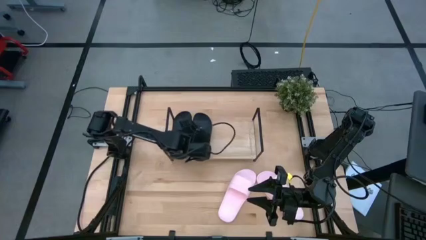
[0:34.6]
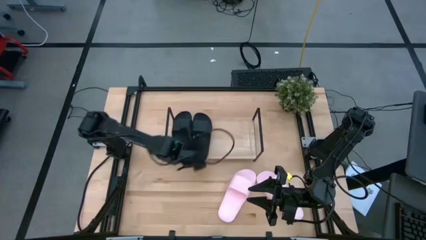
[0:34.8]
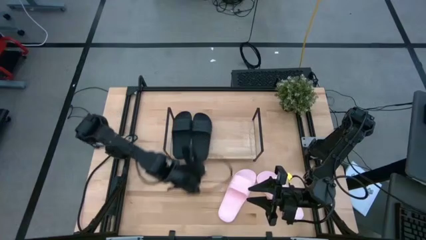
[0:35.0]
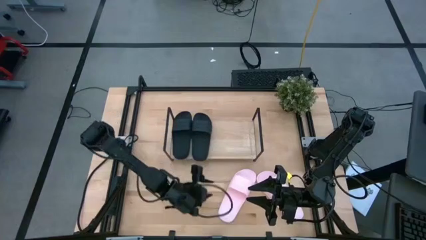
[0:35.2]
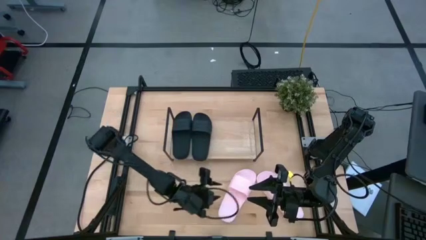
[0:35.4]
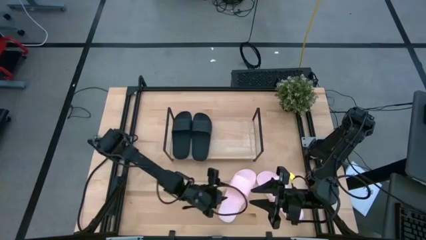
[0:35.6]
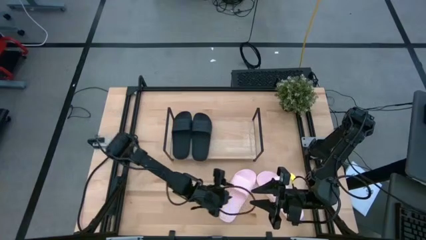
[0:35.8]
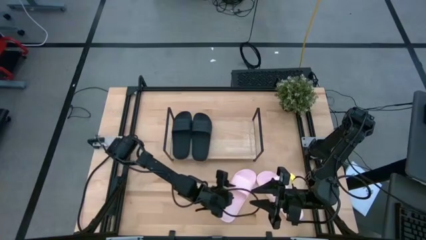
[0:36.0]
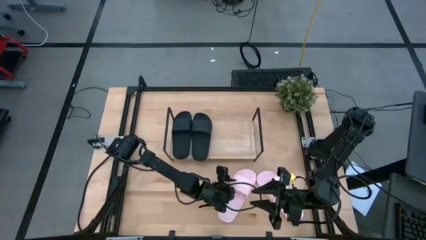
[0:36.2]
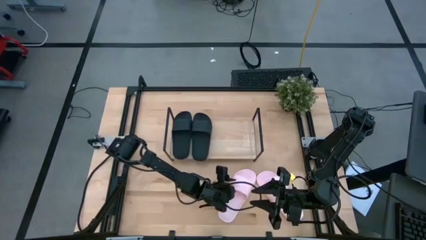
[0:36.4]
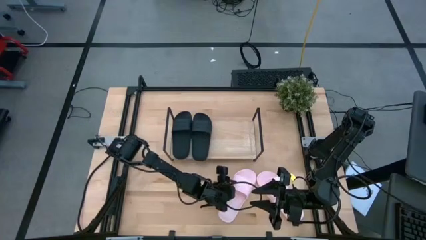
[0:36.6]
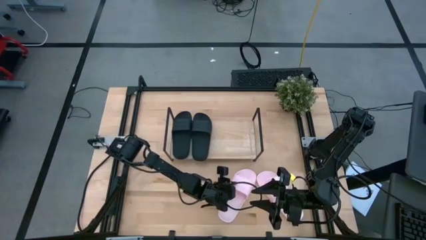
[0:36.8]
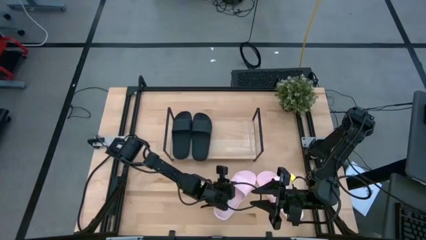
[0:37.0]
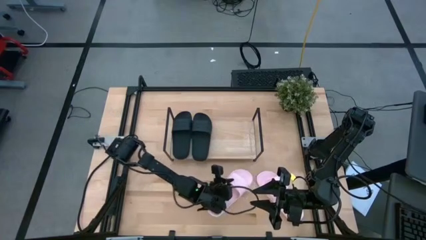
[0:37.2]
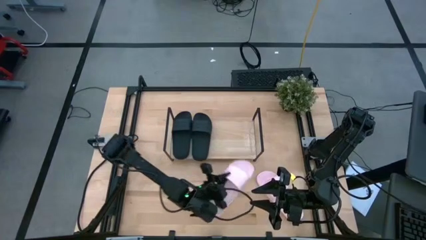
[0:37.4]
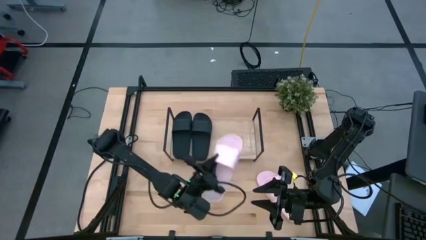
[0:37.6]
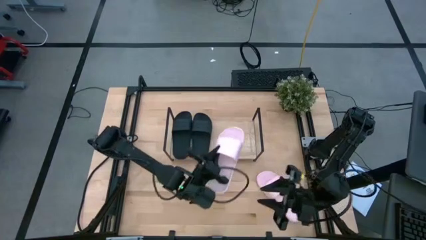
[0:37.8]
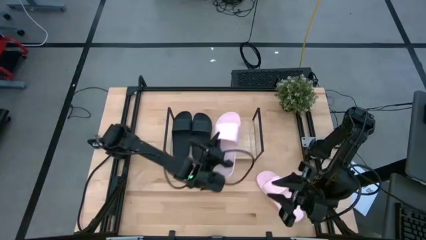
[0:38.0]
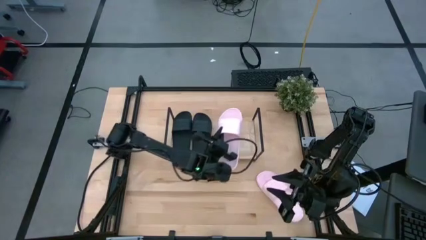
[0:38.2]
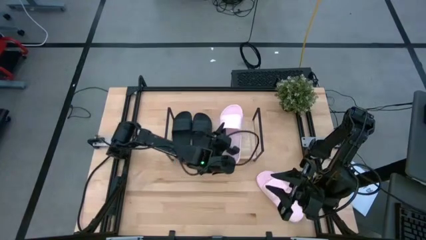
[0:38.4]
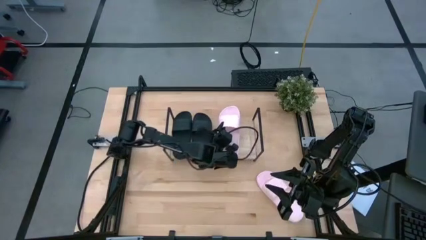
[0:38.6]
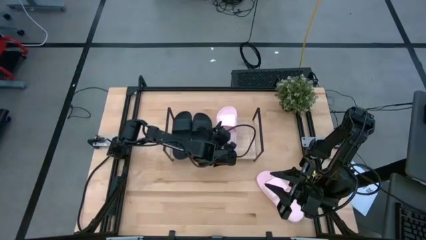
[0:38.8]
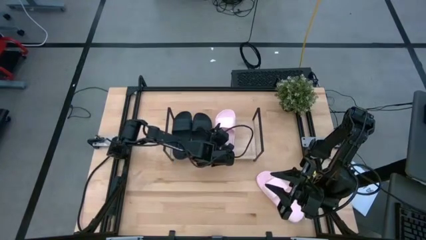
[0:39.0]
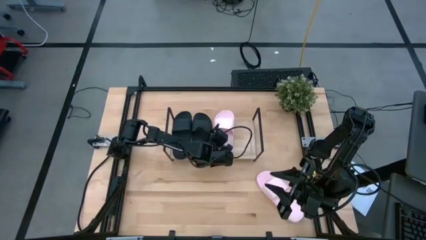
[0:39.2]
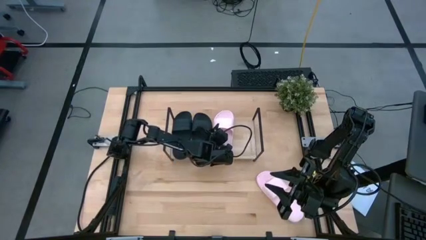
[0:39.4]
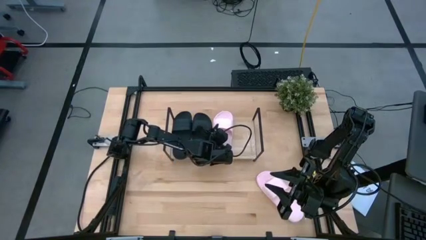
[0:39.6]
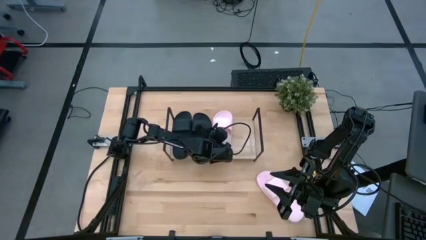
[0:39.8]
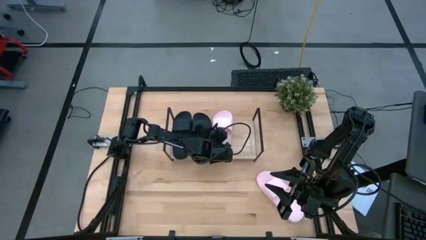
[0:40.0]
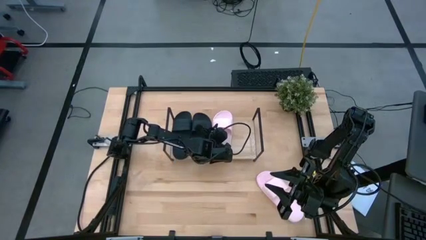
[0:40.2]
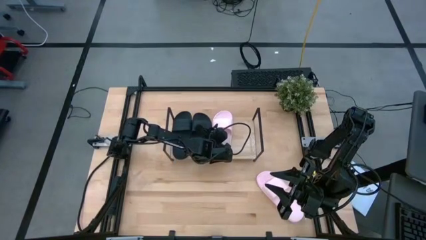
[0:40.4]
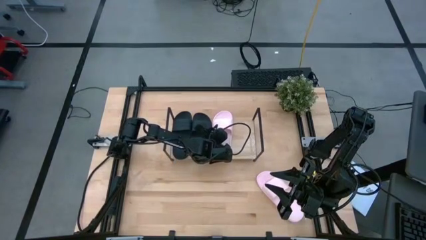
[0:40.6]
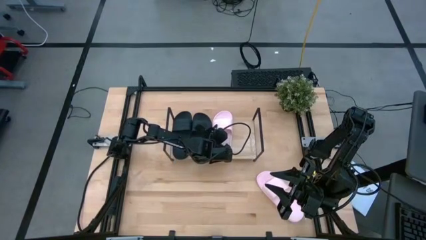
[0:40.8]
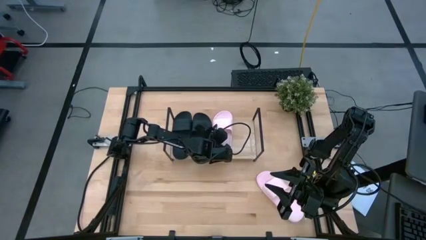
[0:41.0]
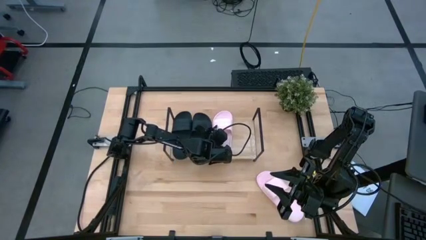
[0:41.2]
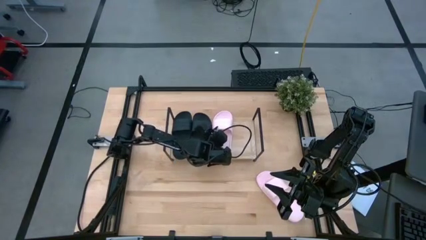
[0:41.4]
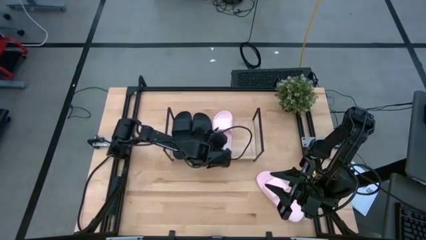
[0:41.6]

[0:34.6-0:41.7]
Task: Pick and place slides into the shelf
Put the left pink slipper on the shelf

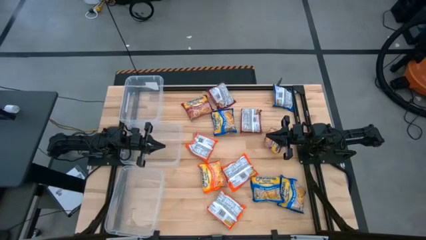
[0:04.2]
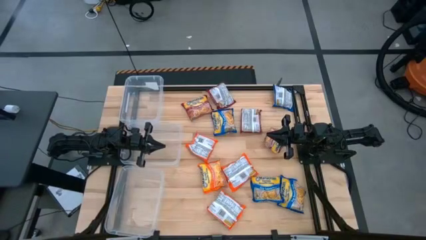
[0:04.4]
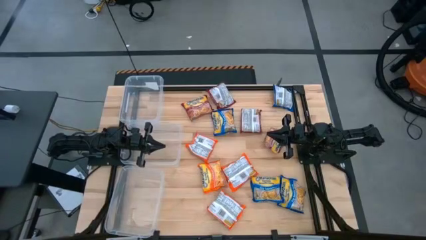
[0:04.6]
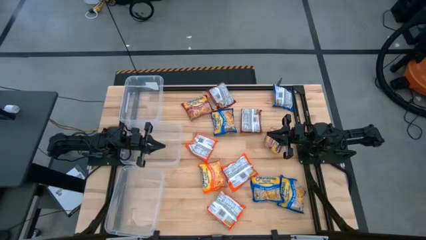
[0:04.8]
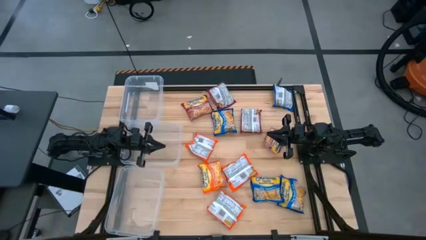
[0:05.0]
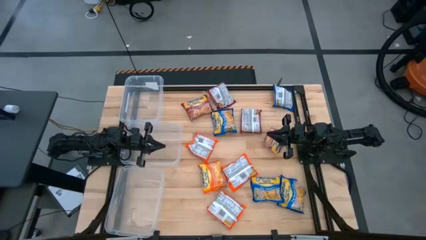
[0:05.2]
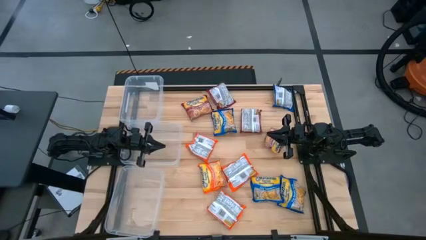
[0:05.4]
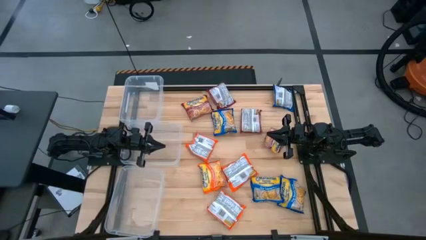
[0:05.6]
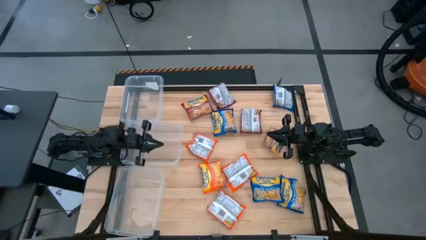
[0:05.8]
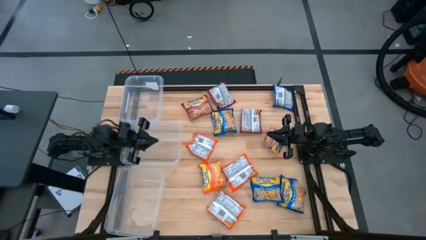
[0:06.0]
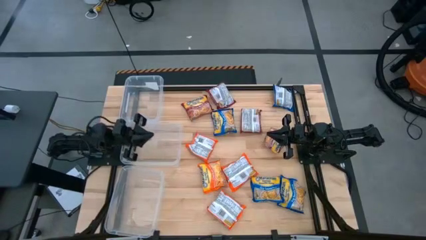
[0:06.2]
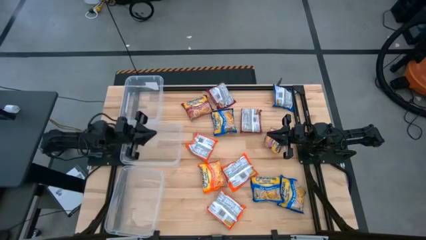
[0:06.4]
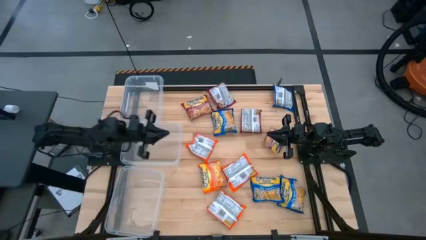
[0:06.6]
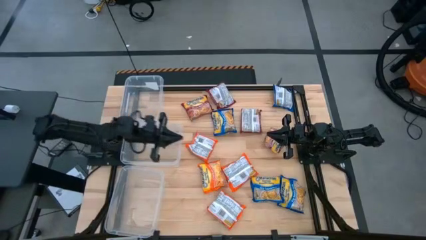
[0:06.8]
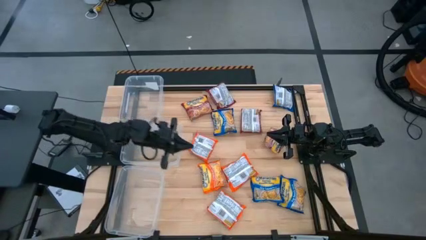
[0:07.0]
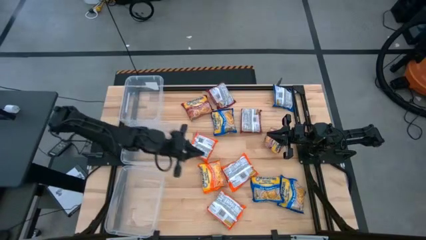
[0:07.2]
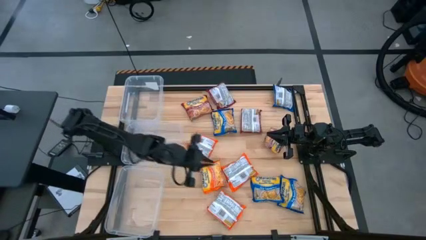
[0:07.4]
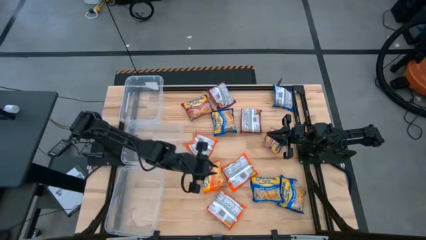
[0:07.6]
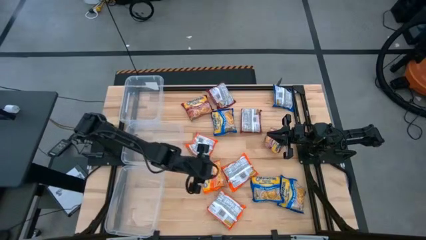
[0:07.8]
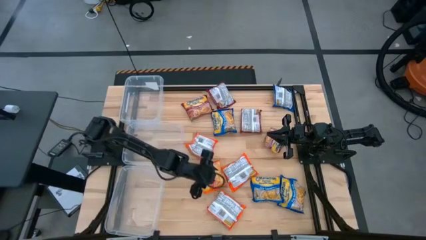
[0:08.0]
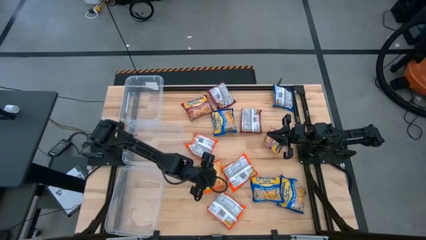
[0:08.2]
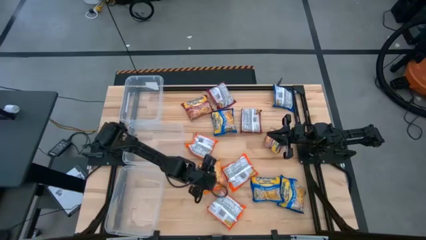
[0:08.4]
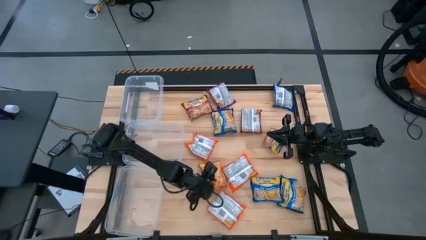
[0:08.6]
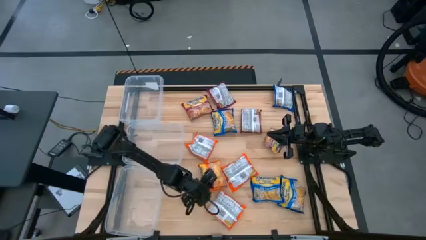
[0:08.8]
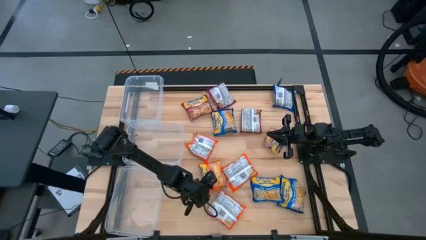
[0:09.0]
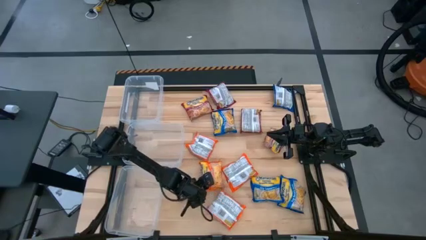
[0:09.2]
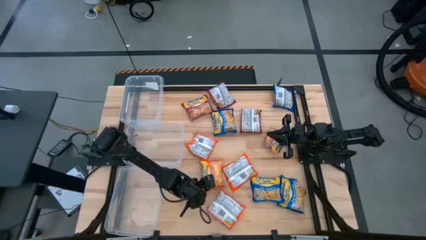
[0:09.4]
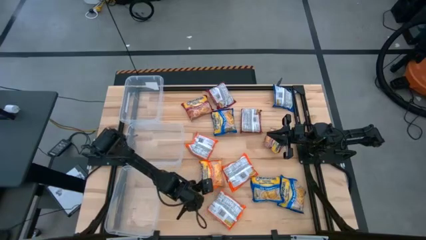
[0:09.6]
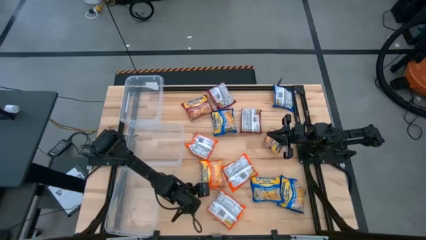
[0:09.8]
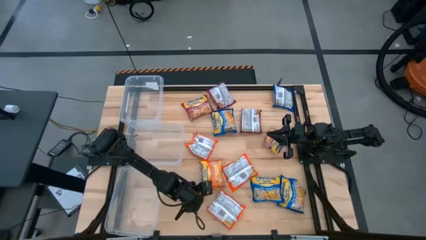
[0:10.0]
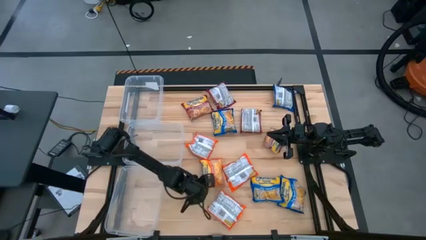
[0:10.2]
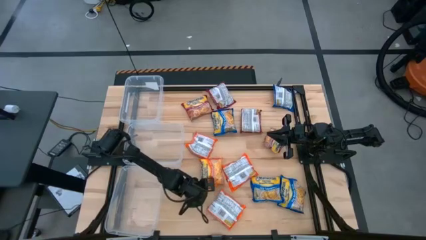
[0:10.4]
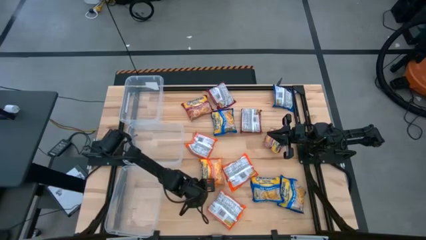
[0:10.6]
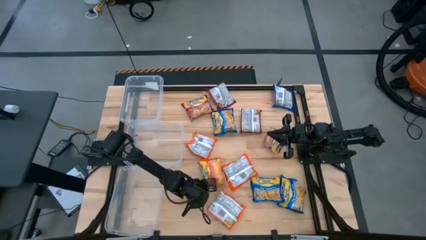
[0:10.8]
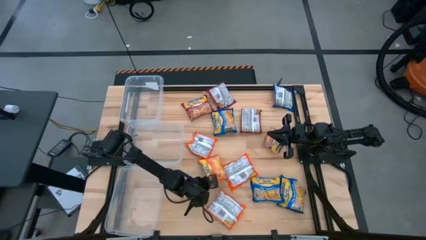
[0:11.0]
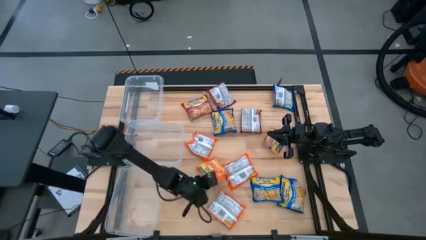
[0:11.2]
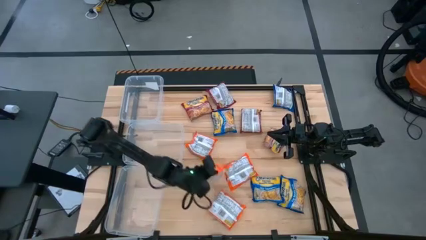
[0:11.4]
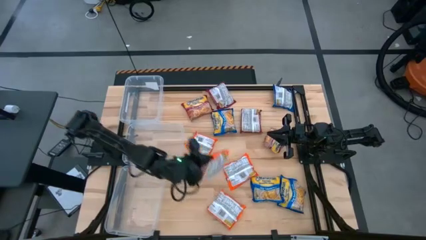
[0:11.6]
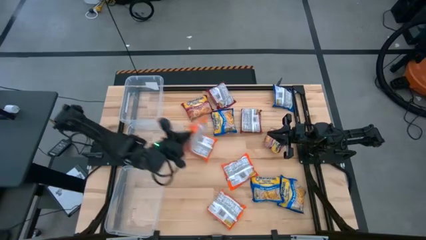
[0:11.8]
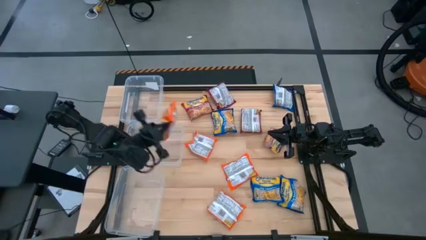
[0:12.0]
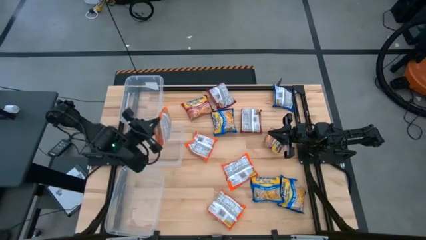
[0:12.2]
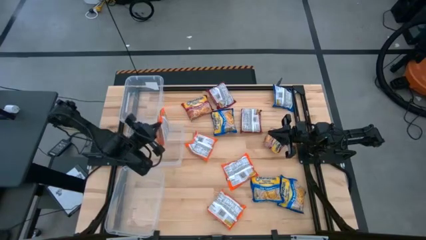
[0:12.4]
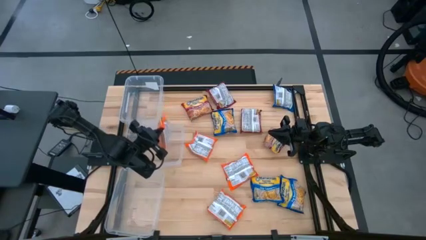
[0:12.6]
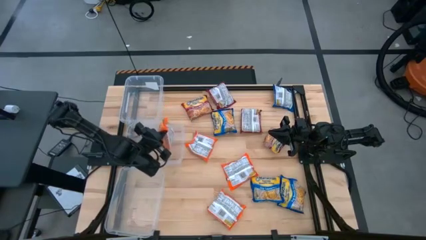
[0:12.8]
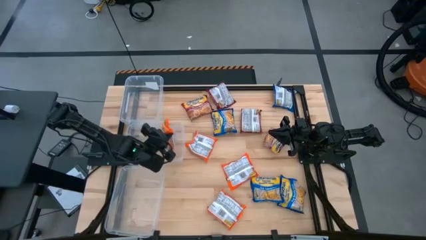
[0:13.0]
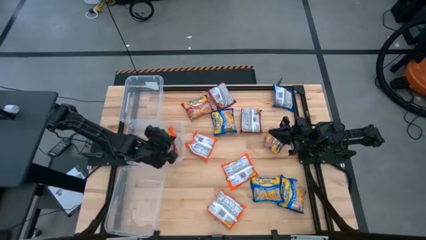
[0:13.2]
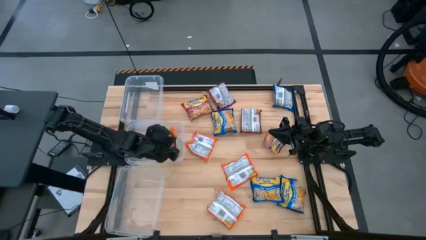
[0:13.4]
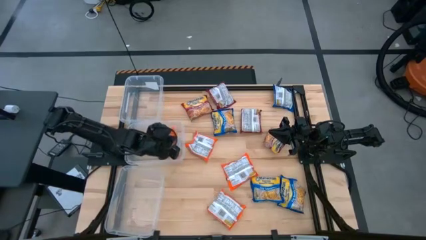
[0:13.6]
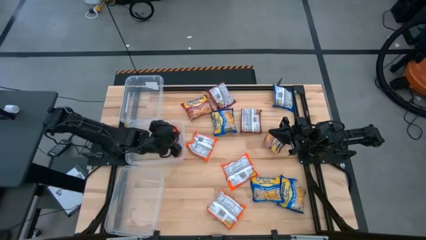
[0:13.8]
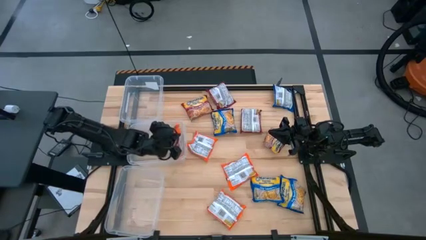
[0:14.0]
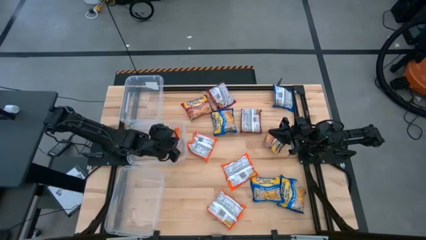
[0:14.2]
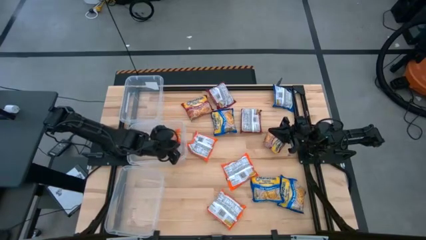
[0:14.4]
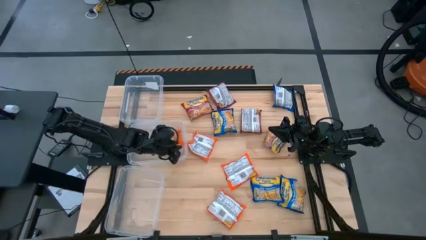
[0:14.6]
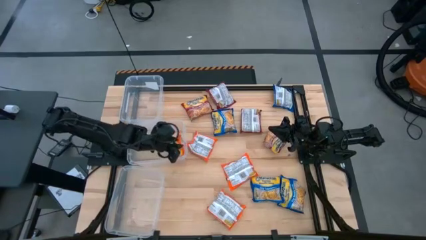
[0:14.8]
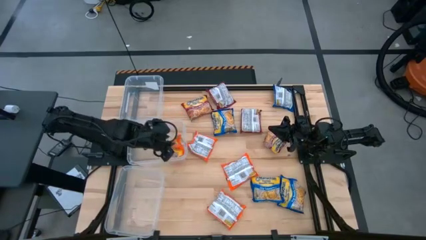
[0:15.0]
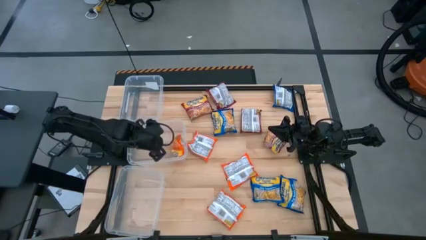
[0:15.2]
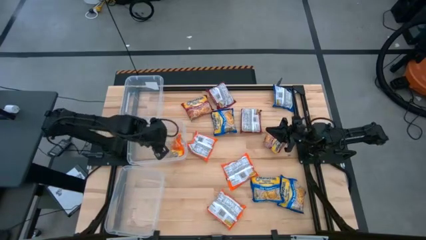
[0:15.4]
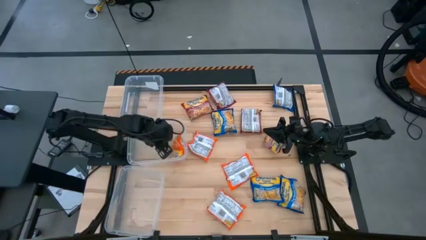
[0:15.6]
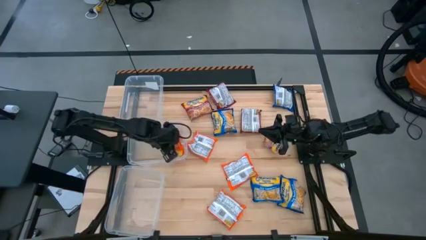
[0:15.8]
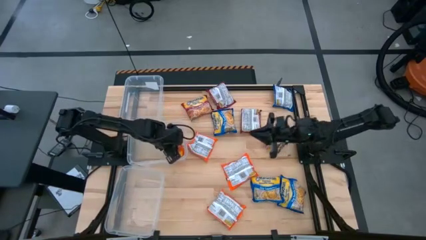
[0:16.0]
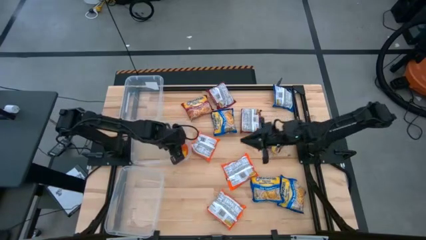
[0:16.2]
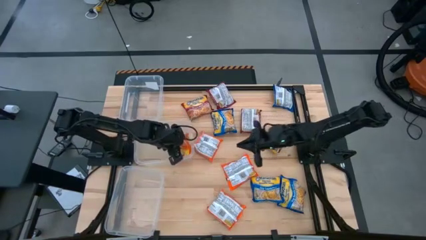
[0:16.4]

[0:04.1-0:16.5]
Task: Sort Maruchan noodles
Put the orange noodle pack into the middle transparent bin
